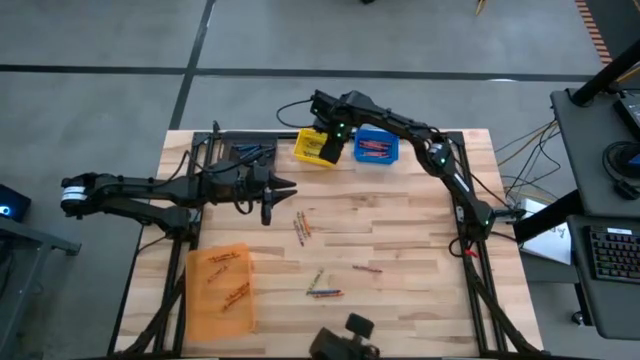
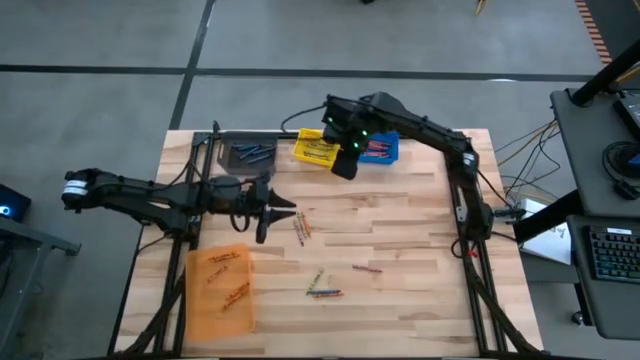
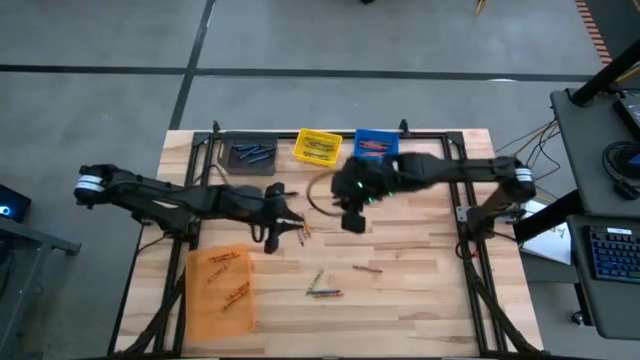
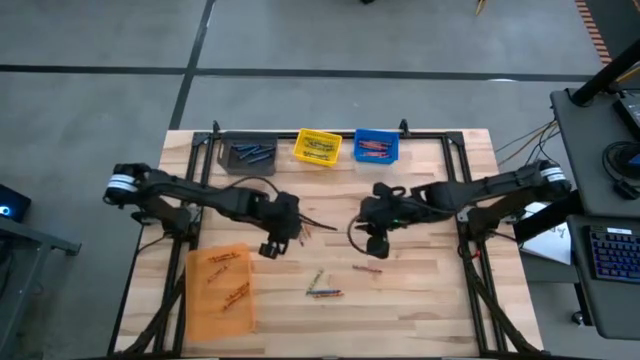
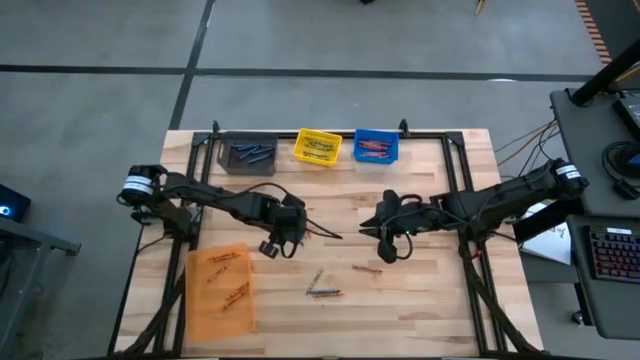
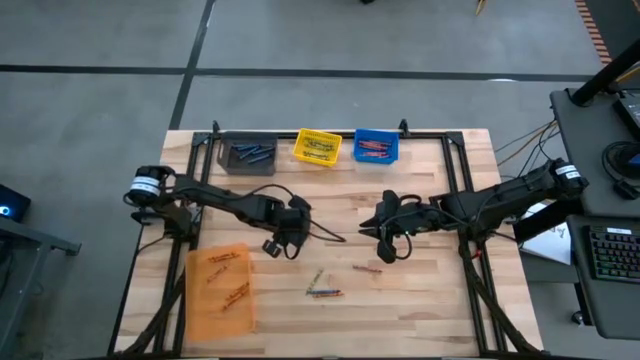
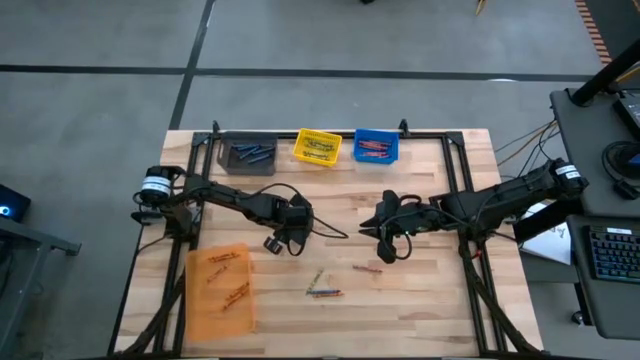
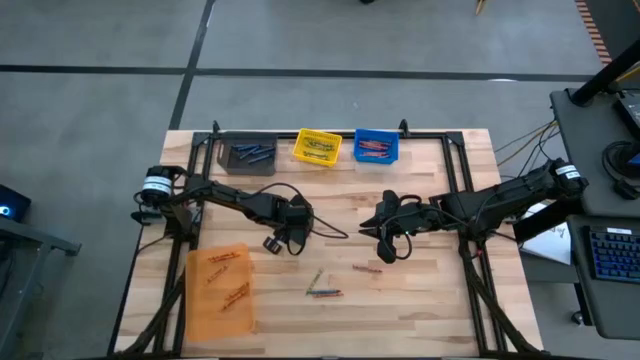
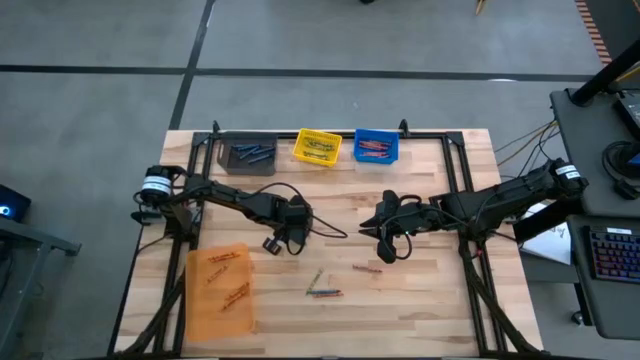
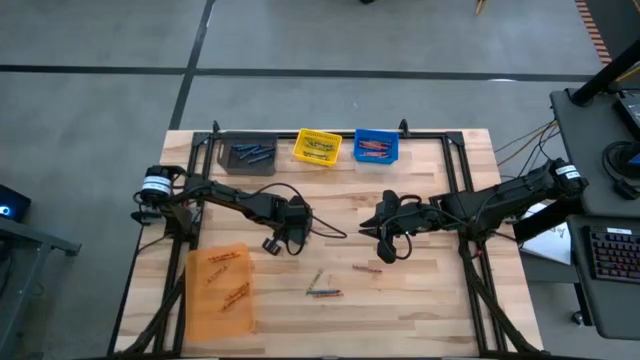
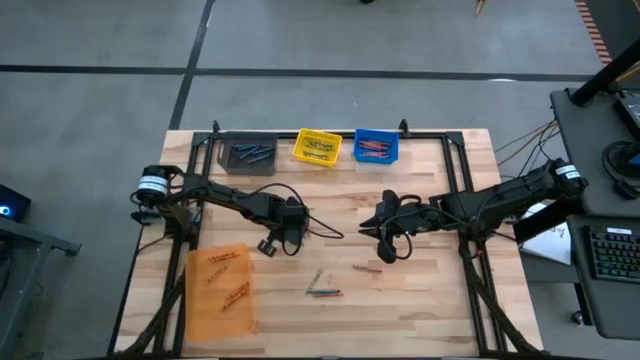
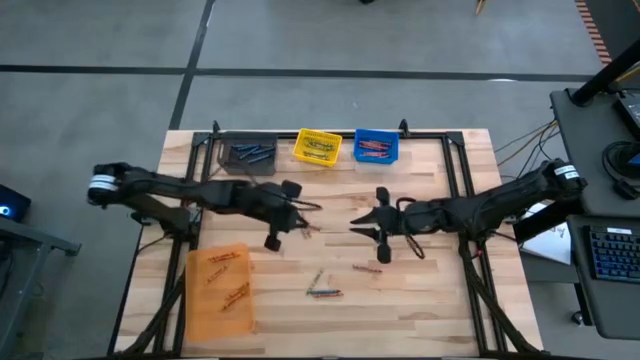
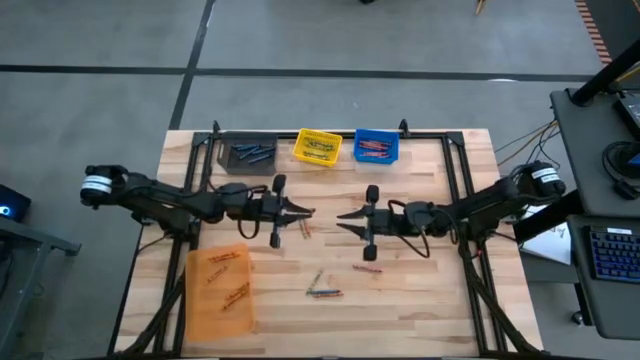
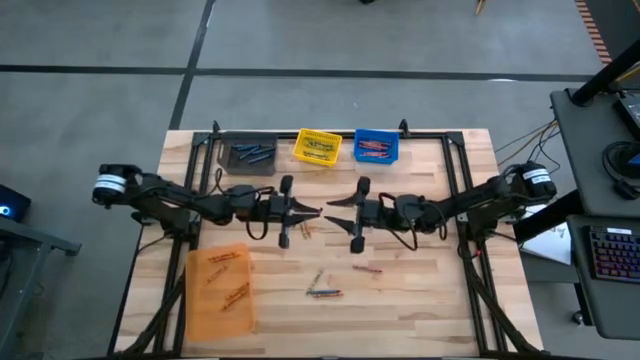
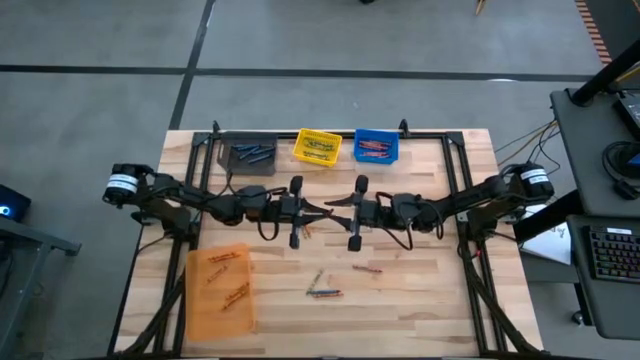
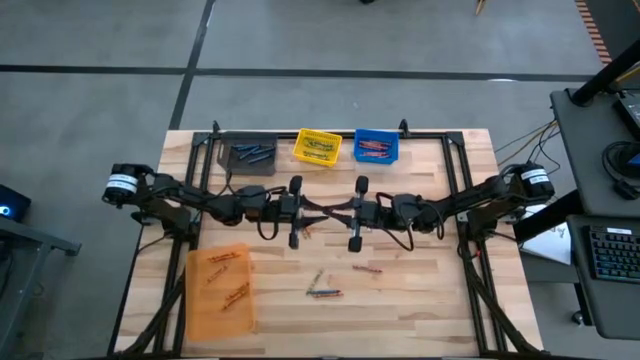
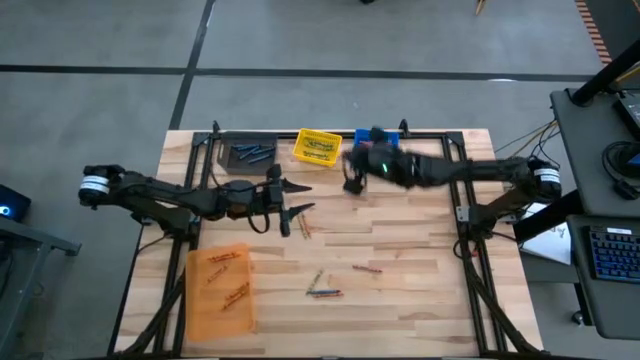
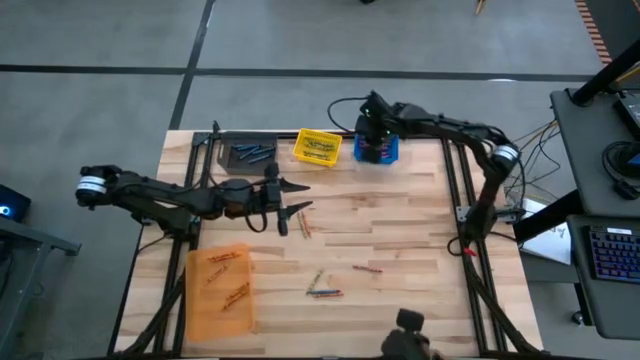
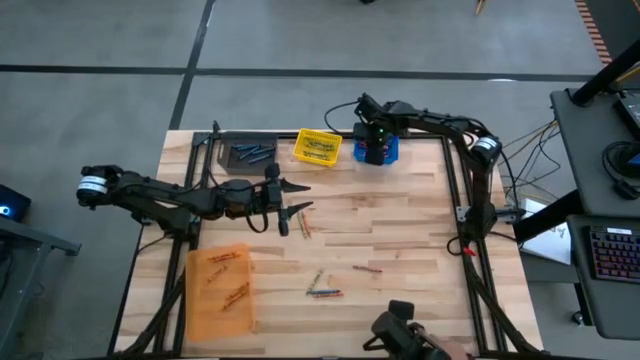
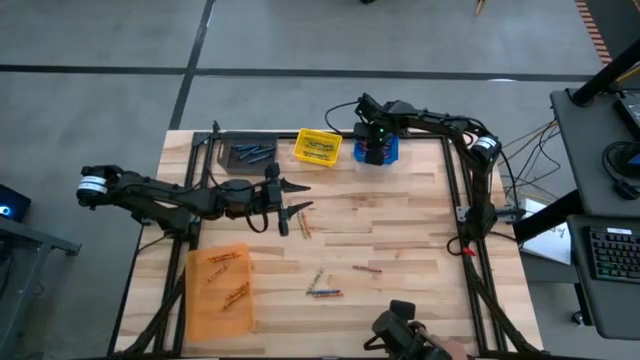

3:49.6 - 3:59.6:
Task: Sort crayons
Put the red crayon into the blue bin

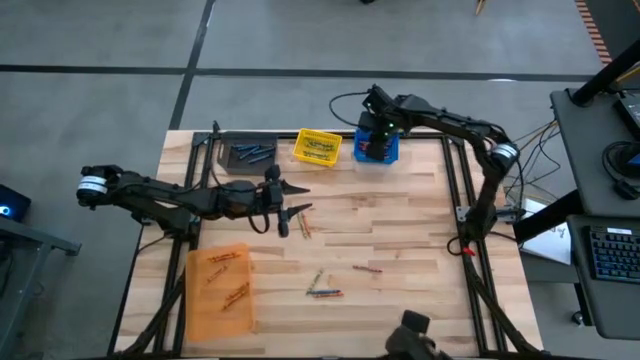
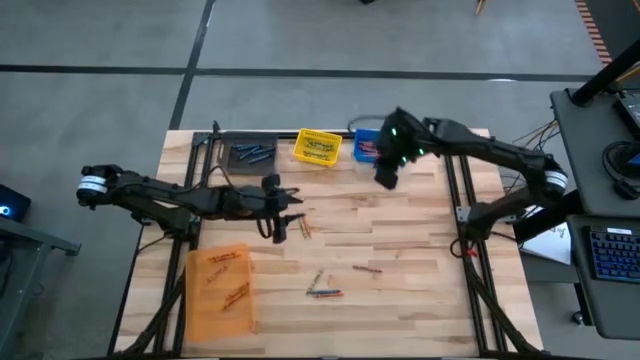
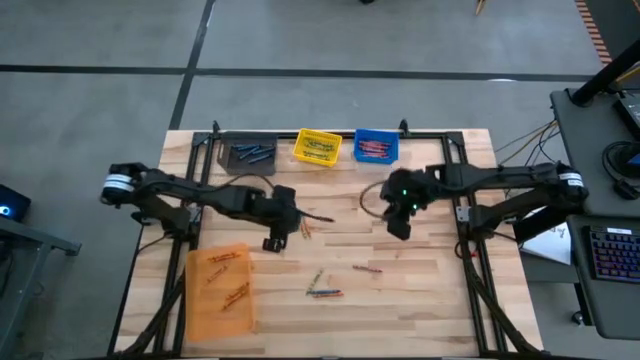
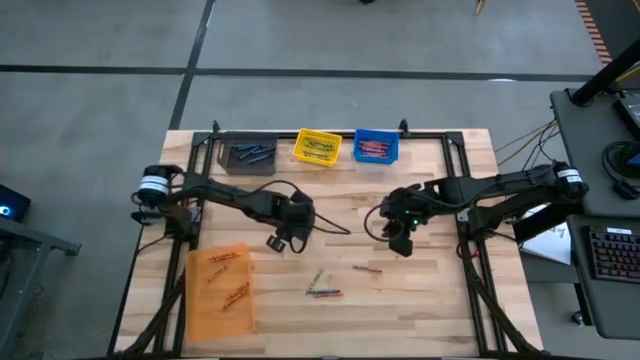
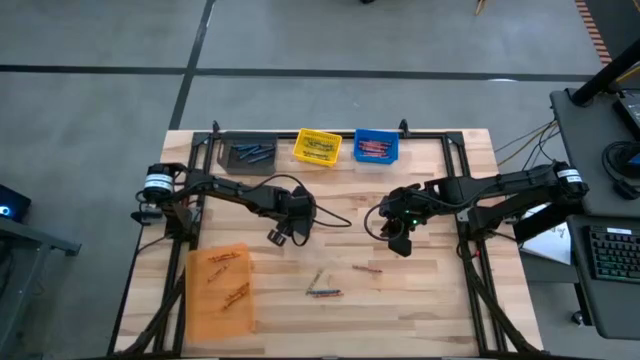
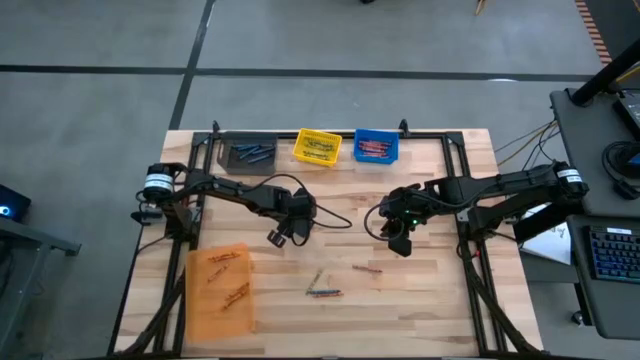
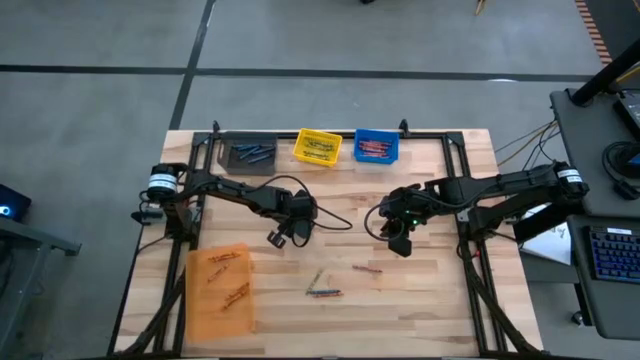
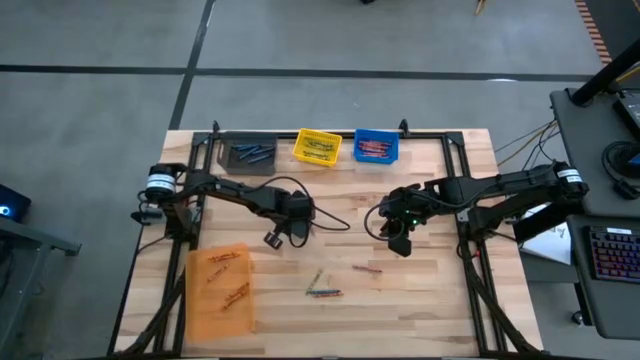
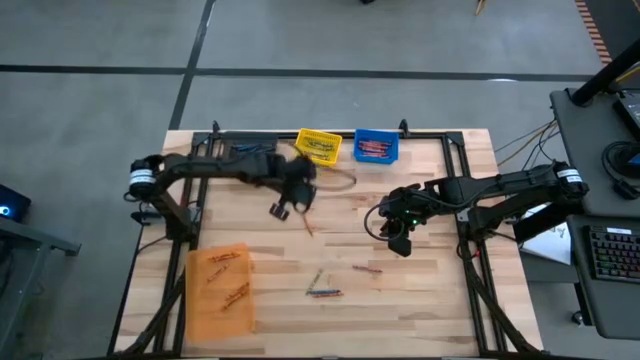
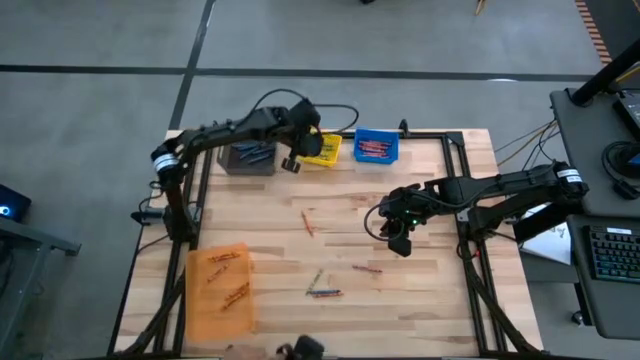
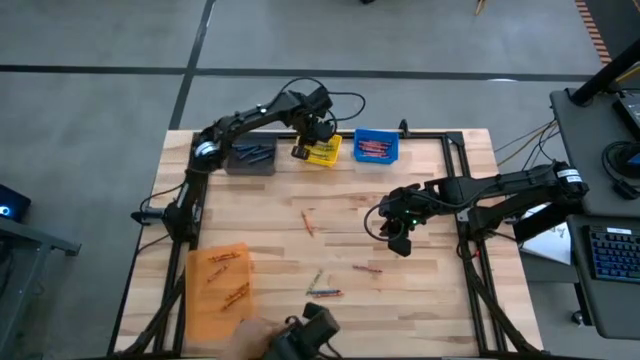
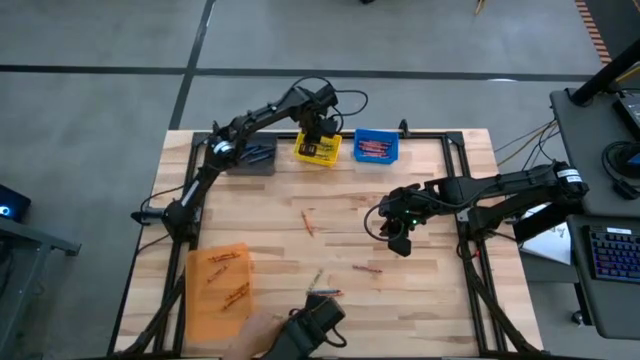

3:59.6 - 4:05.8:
Put the green crayon into the yellow bin

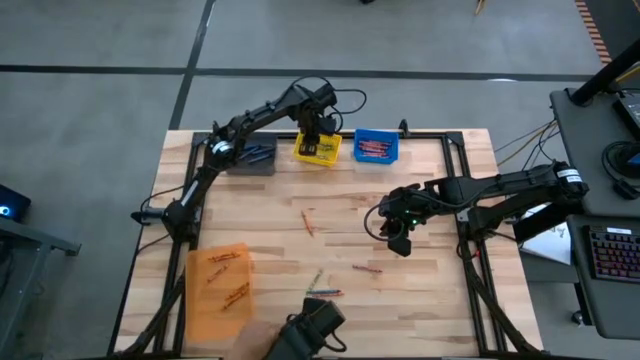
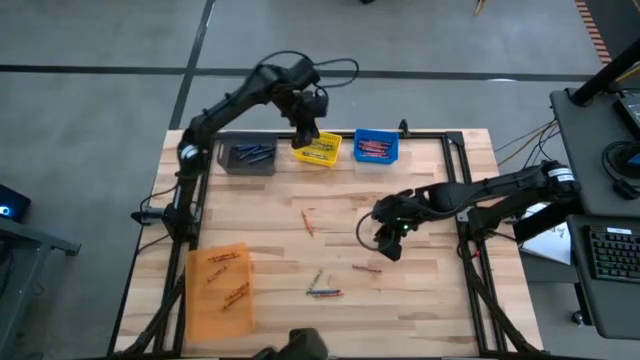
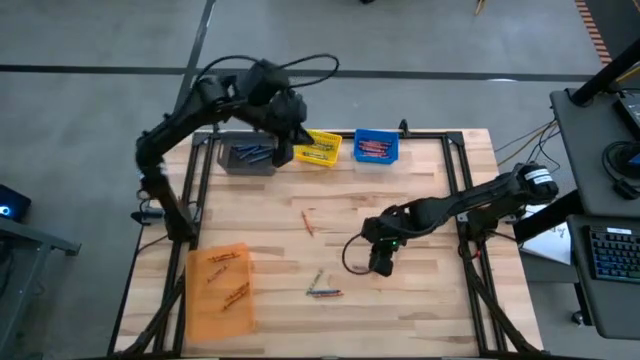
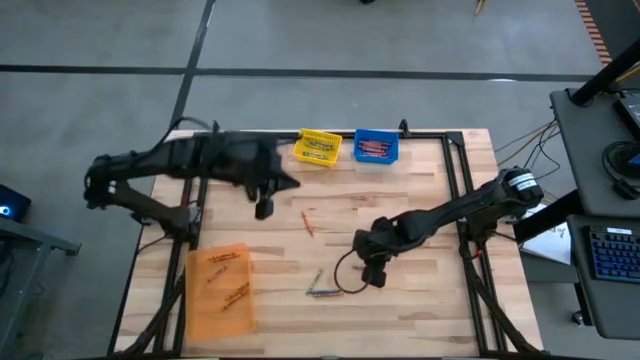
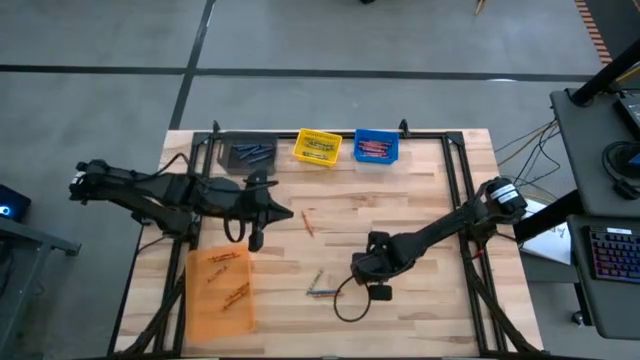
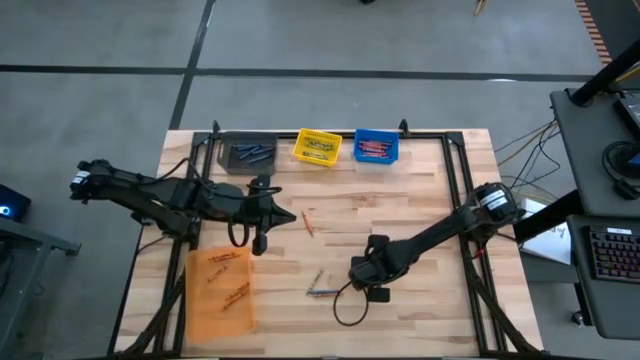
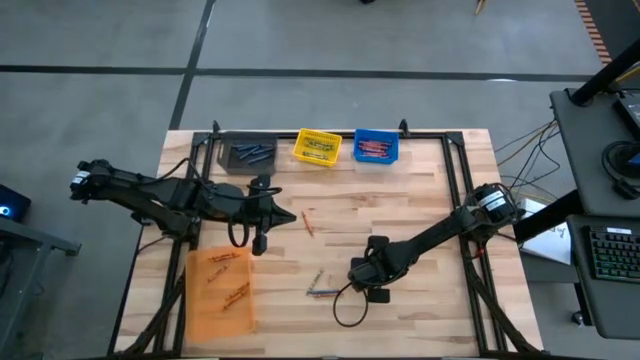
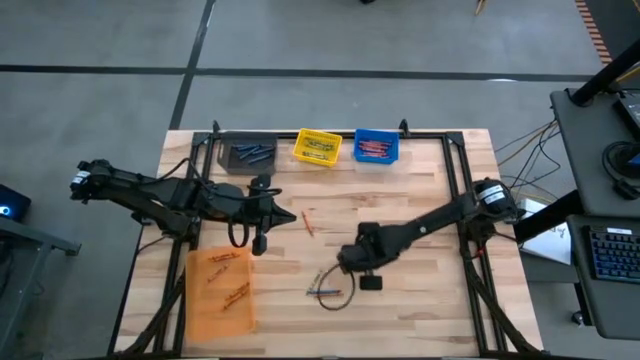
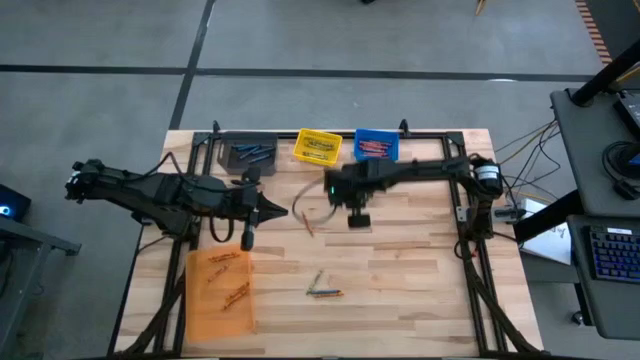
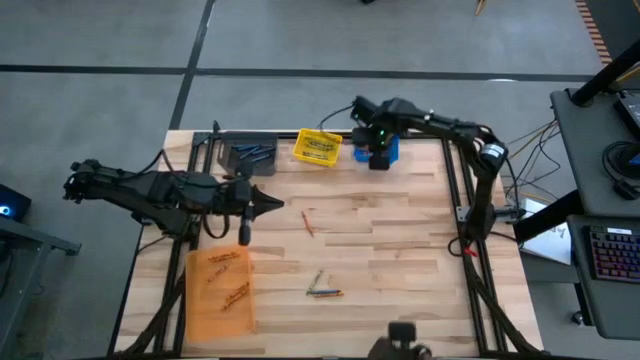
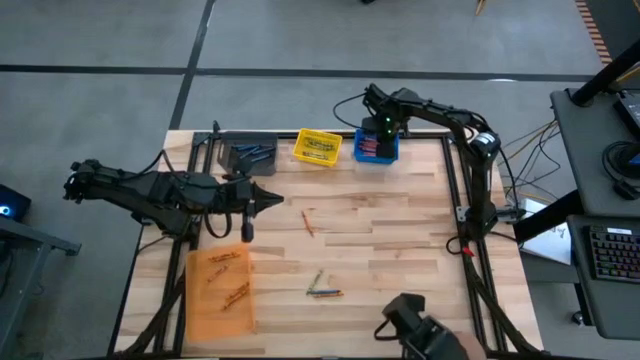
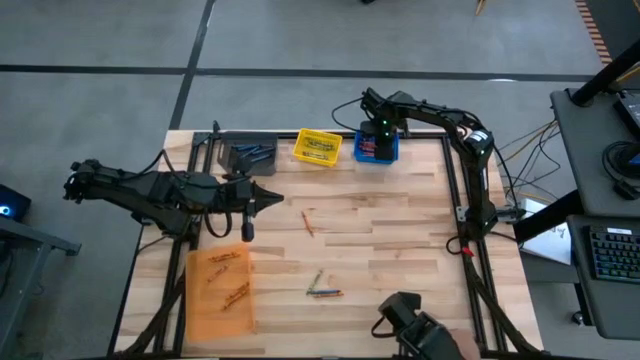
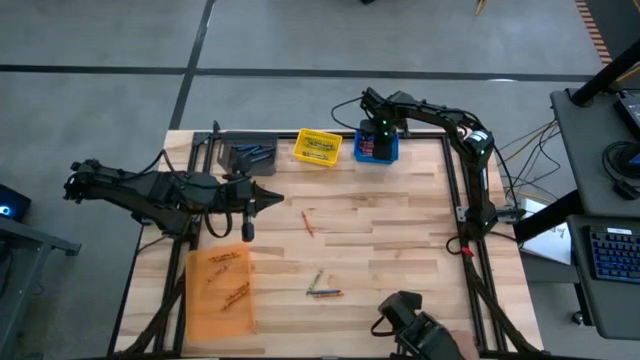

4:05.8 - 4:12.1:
Put the red crayon into the blue bin
